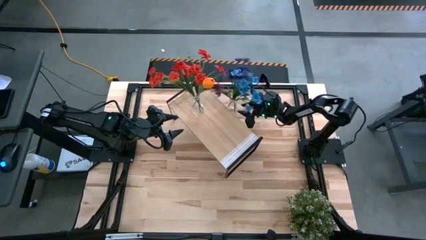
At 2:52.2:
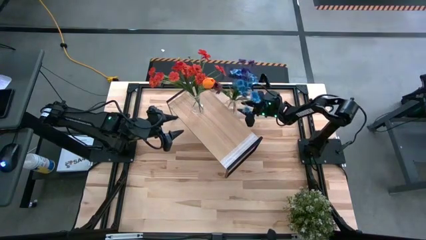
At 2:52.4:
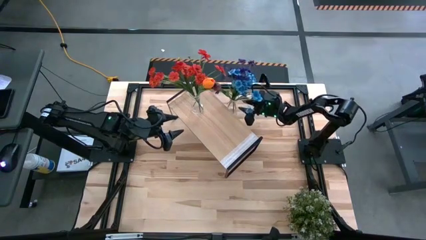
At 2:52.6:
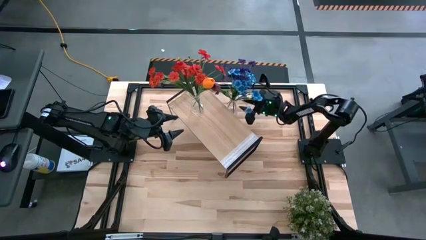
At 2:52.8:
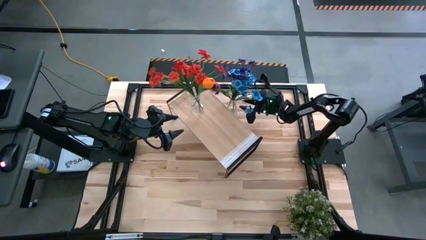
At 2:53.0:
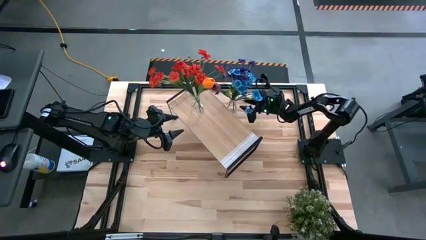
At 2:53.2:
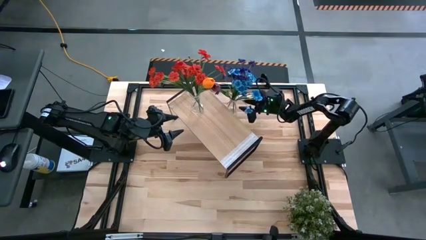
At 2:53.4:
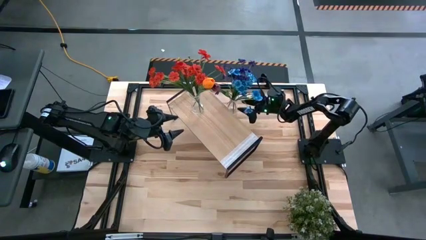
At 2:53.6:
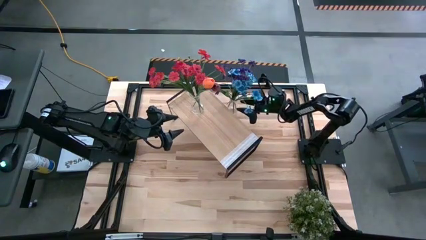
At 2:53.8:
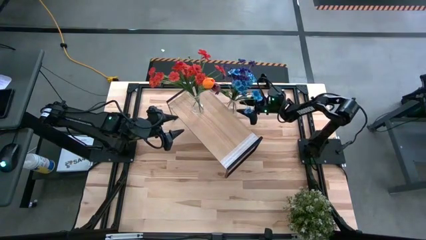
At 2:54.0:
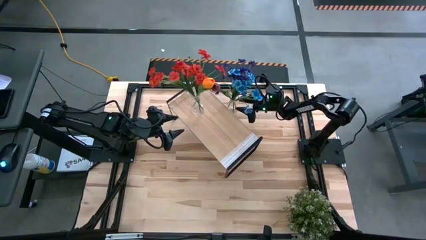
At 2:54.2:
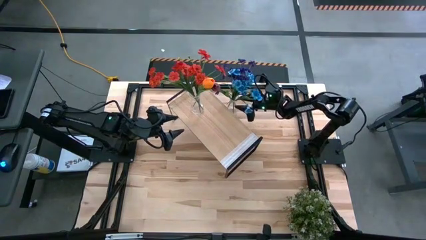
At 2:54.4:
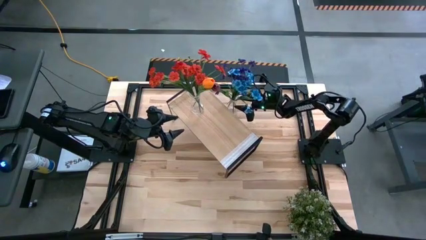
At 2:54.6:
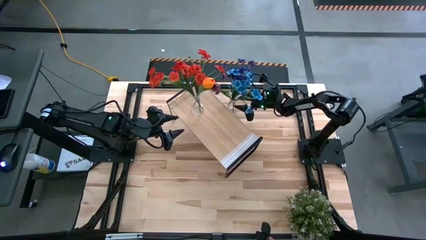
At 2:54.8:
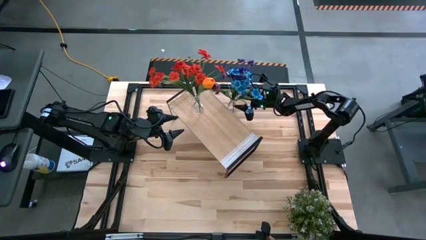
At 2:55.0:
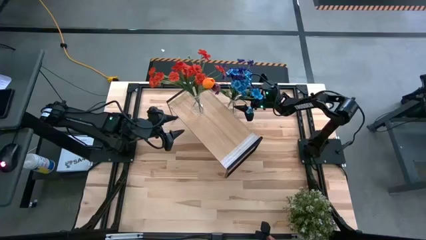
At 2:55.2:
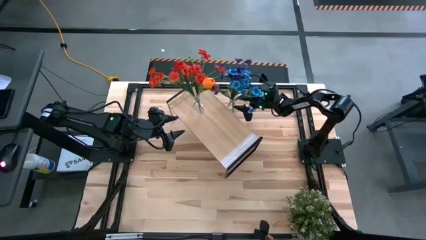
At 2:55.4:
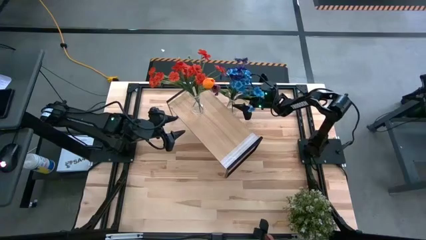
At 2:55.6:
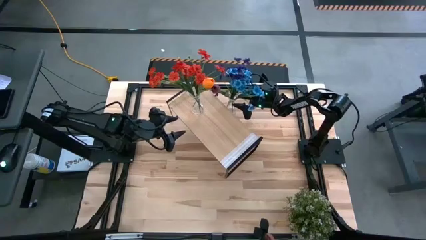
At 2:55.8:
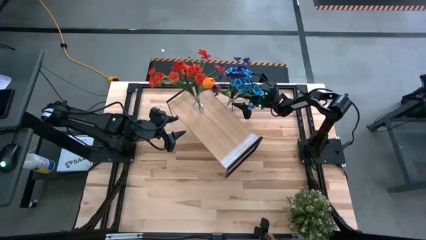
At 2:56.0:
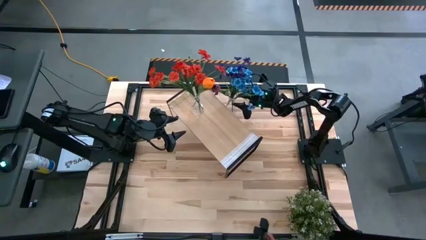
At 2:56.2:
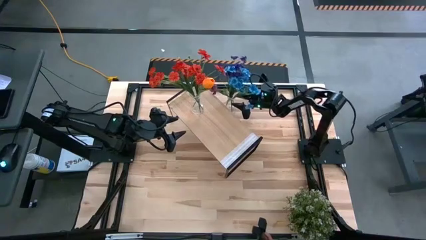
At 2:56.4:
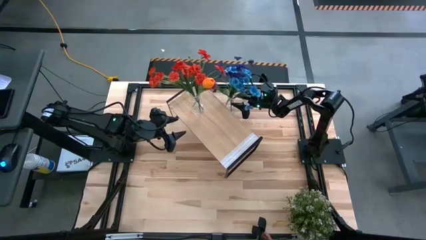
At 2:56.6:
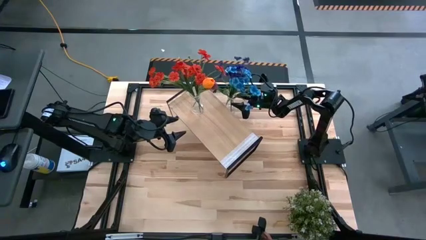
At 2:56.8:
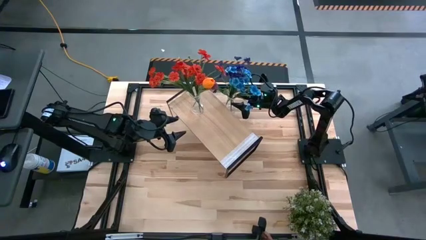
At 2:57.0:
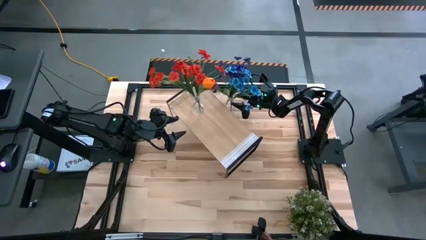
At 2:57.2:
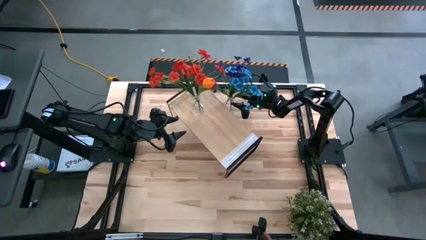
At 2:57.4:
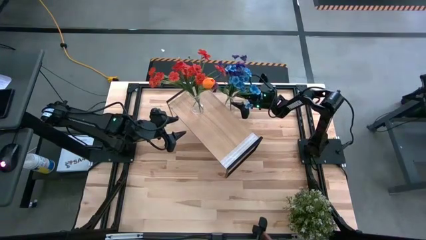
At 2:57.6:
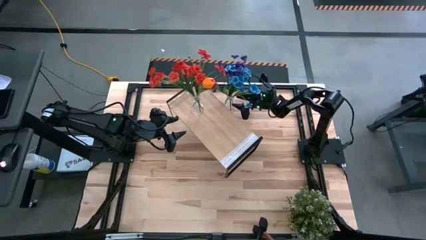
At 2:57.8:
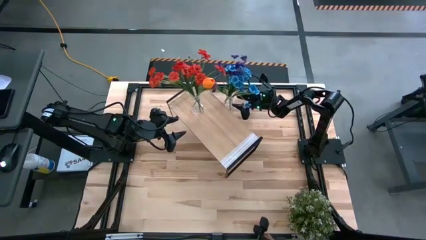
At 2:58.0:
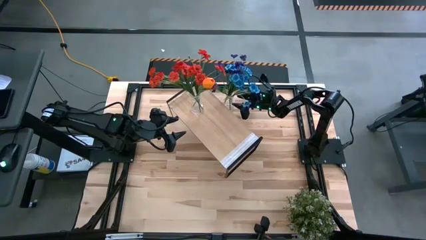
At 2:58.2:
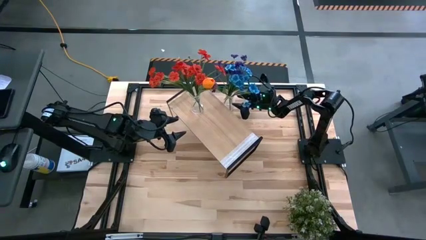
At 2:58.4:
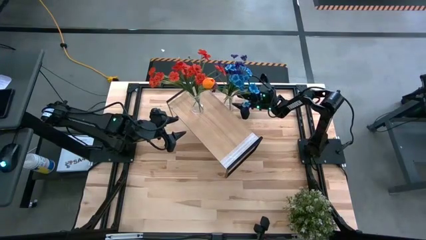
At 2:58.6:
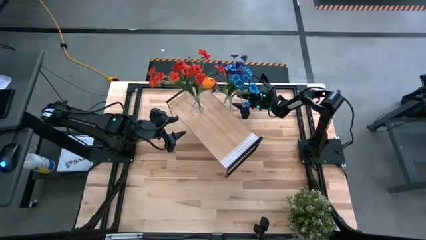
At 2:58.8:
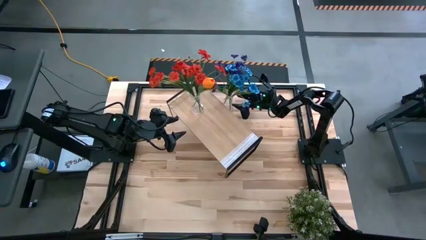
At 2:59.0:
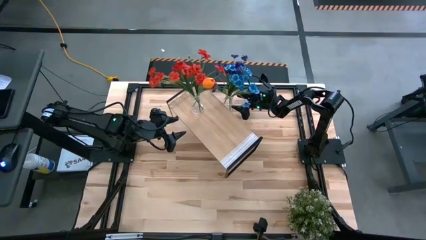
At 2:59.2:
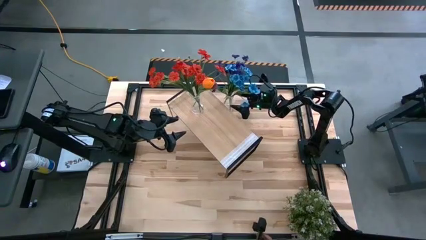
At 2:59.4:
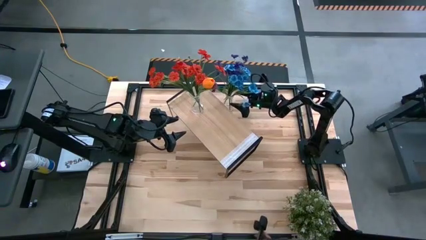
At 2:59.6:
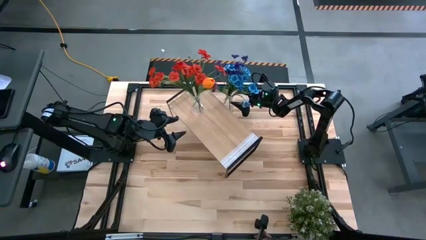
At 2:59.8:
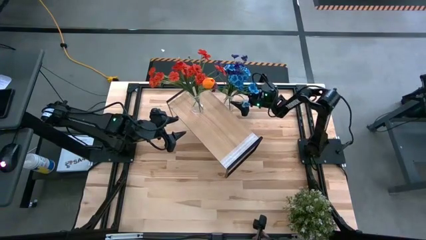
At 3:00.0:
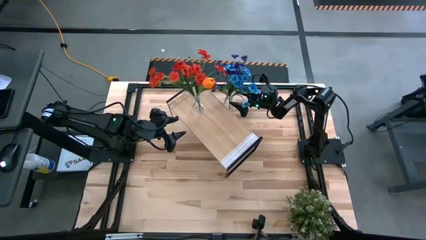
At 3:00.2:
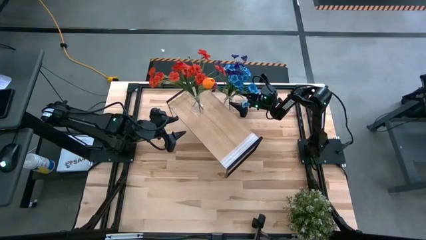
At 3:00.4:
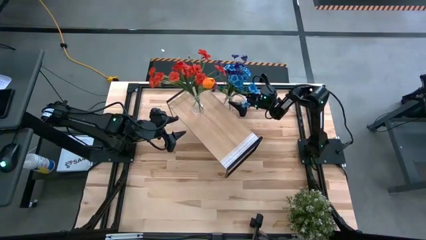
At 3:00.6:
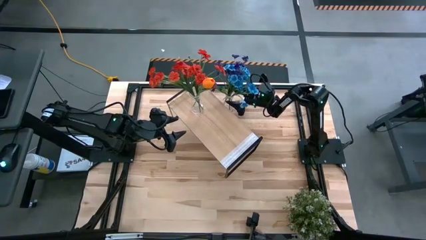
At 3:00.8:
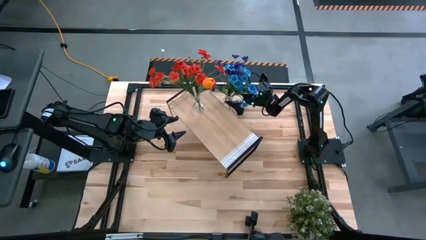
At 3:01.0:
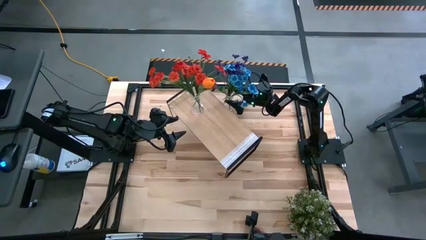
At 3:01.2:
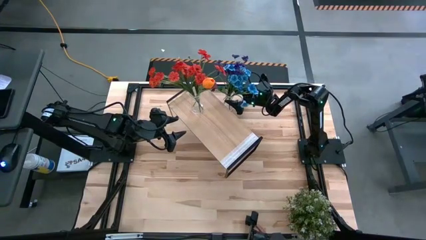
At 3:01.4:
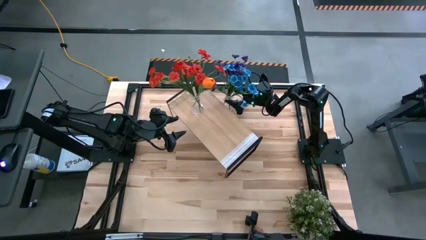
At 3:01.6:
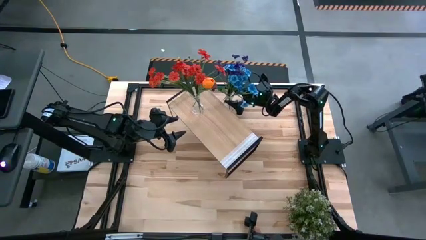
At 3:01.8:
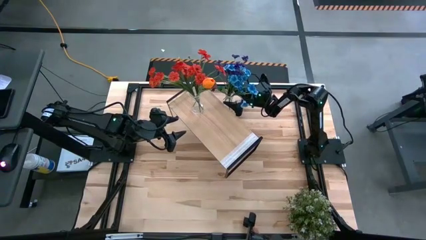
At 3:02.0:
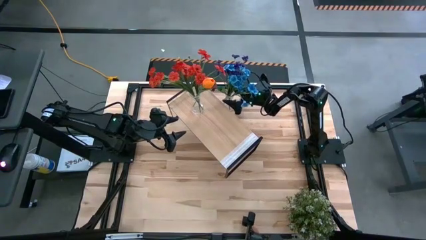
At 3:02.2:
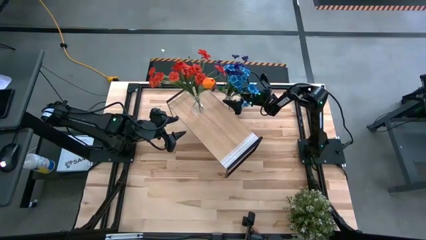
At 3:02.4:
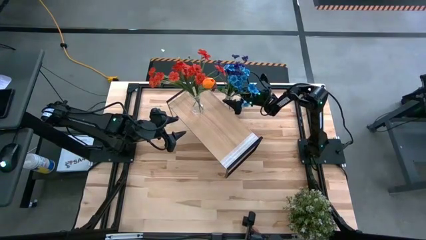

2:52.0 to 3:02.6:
Task: Pick and place flowers into a vace then onto a shelf
Put the transparent vase with flowers on the shelf

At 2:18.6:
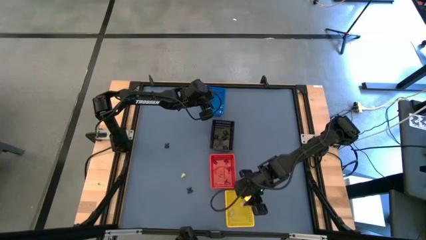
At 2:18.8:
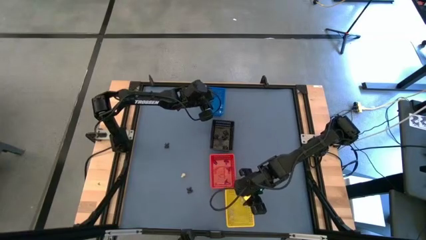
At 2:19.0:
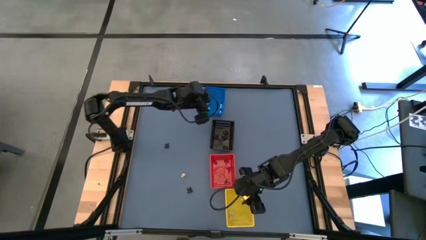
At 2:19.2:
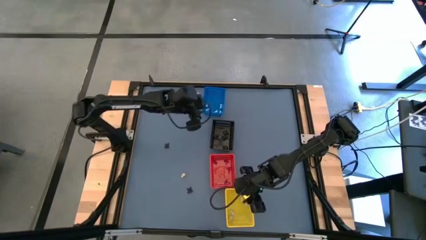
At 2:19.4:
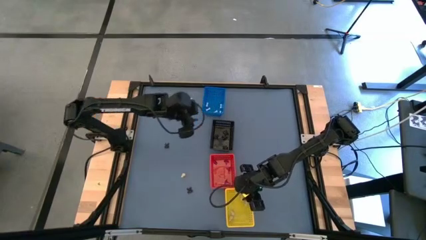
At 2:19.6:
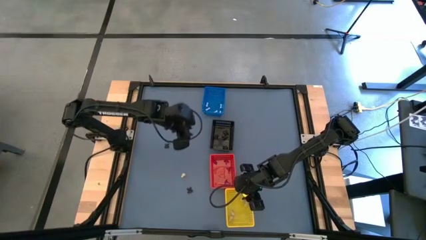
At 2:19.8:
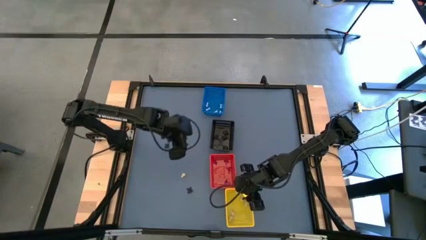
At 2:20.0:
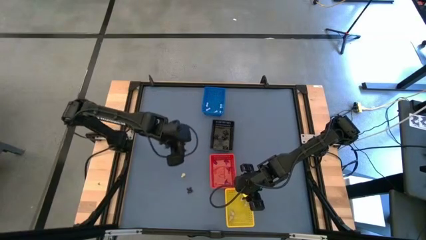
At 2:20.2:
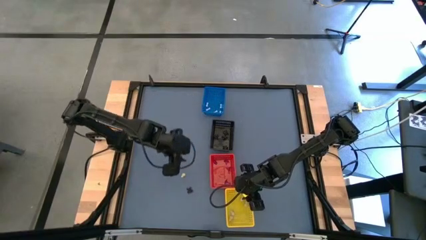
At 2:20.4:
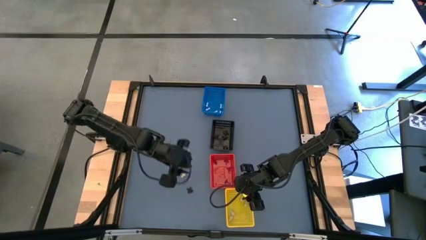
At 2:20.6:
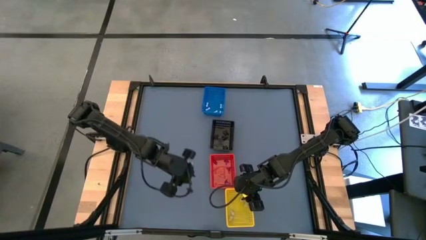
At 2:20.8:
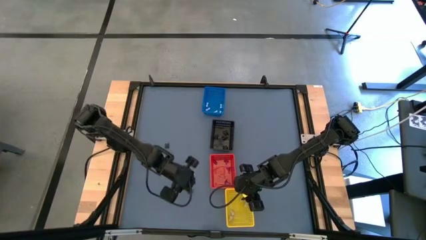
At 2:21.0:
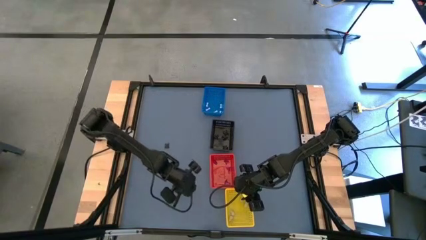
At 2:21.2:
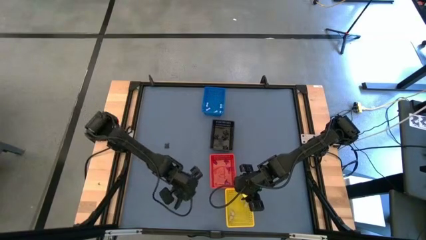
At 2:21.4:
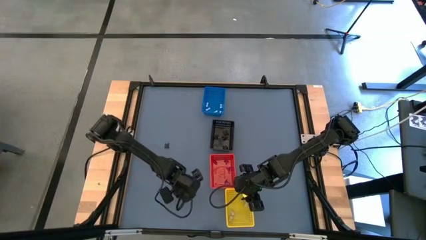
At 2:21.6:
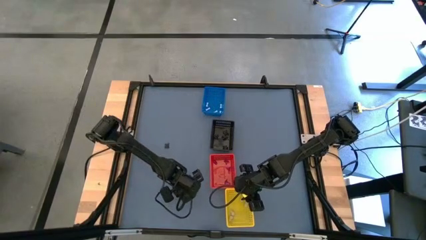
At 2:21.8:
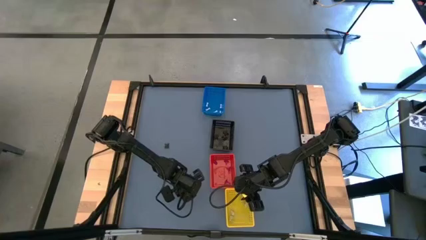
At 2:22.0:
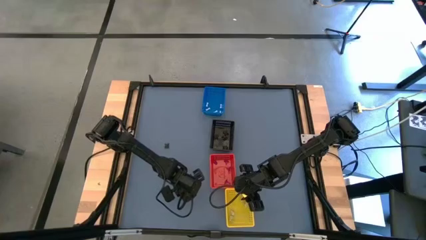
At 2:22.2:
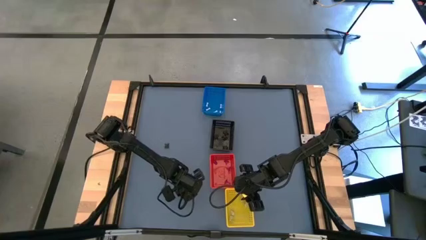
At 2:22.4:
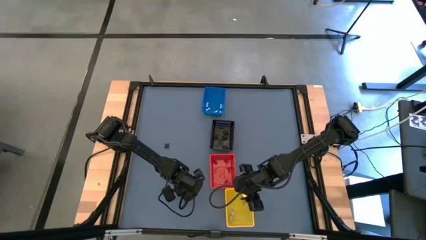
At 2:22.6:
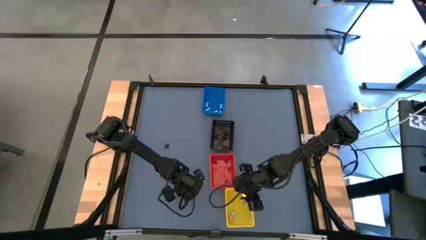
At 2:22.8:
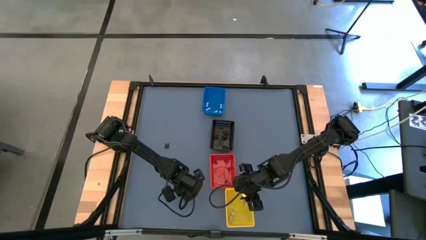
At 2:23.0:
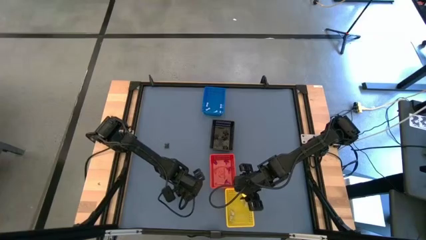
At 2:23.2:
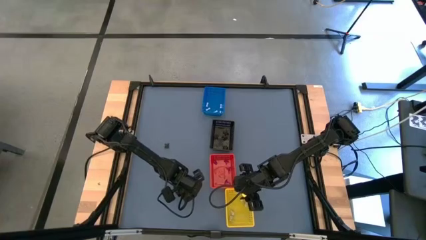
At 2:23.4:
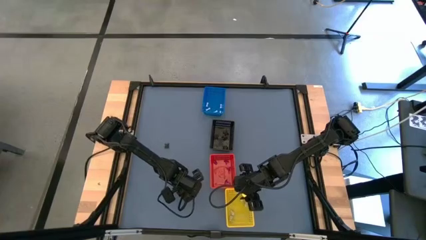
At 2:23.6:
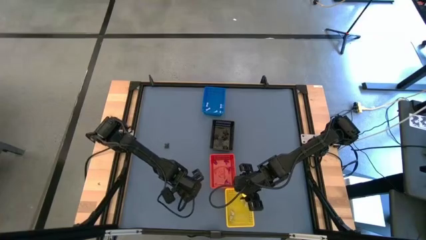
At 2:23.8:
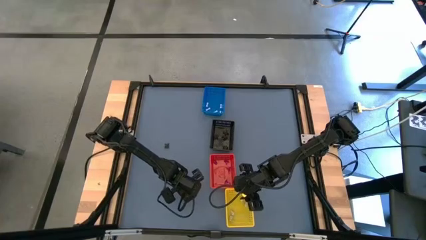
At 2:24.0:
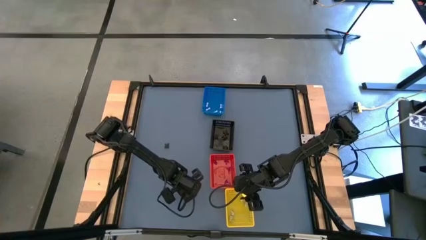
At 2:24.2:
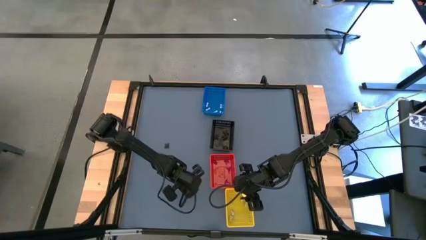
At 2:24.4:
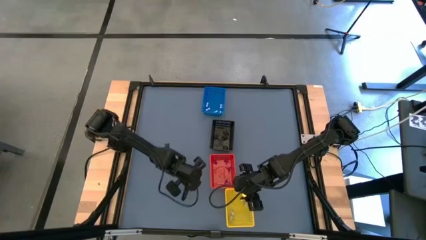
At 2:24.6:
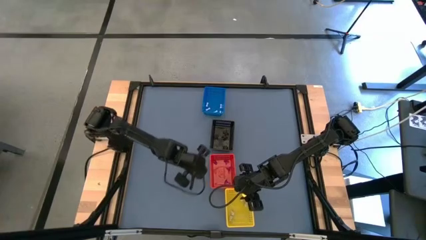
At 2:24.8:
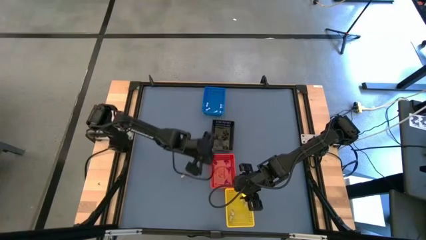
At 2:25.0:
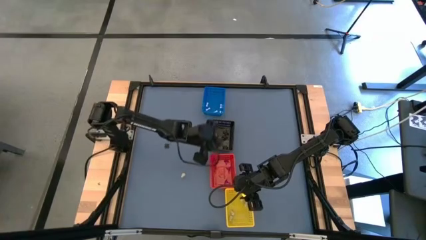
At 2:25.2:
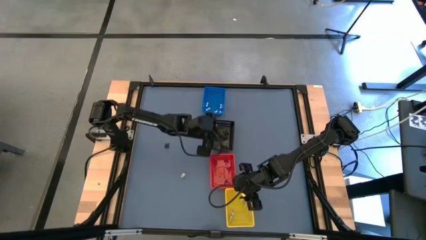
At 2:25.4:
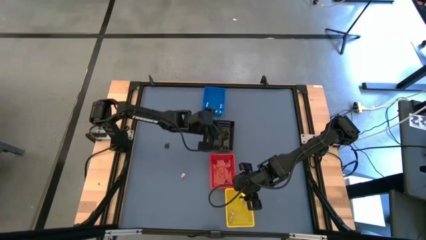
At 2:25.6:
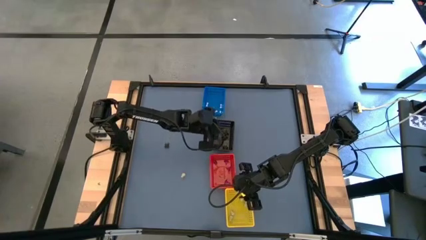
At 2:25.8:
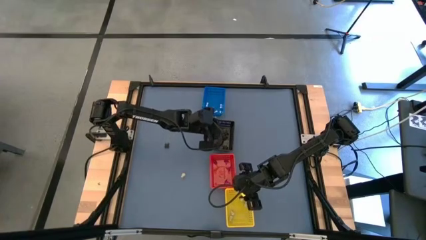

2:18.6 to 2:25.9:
Task: Sort Halloween decoration
Put the black spider toy into the black bin
